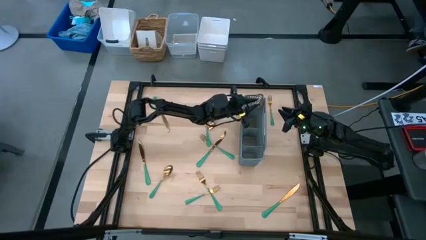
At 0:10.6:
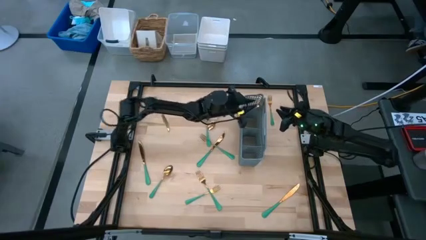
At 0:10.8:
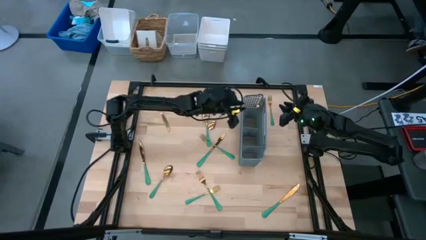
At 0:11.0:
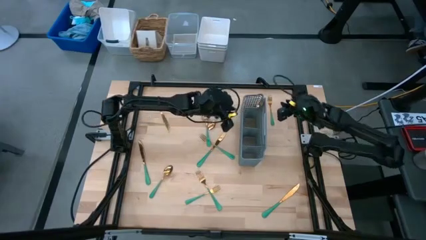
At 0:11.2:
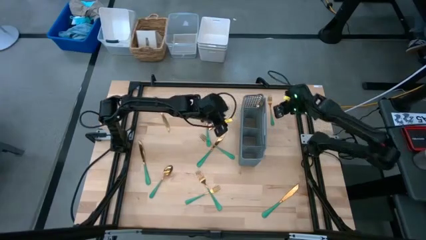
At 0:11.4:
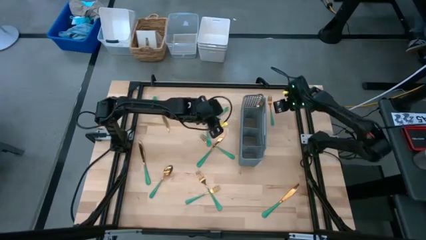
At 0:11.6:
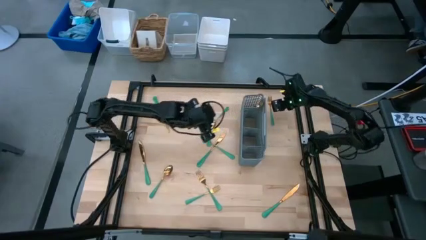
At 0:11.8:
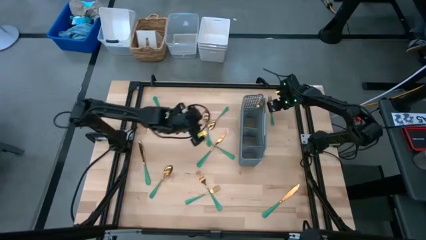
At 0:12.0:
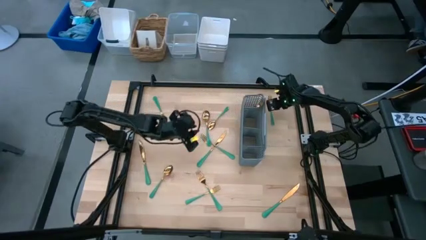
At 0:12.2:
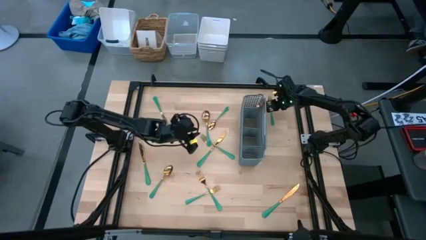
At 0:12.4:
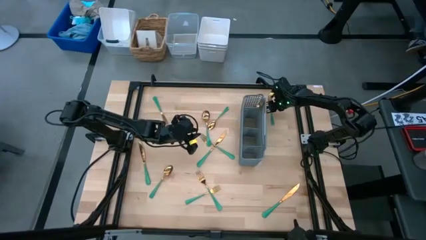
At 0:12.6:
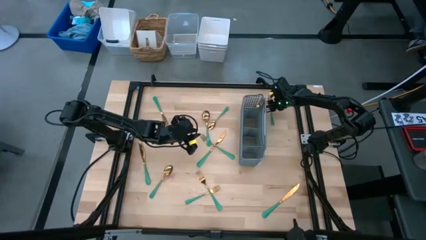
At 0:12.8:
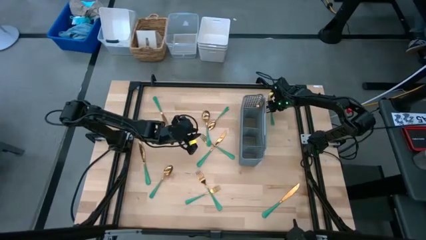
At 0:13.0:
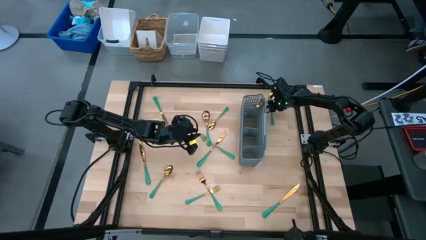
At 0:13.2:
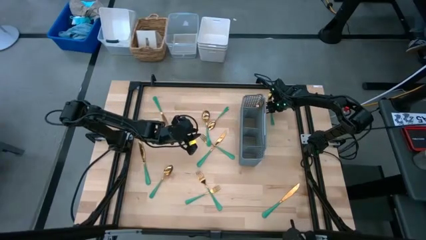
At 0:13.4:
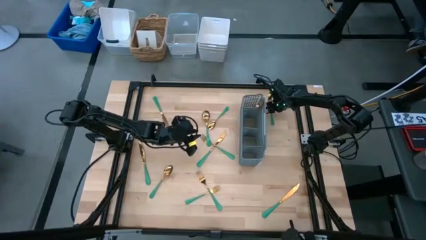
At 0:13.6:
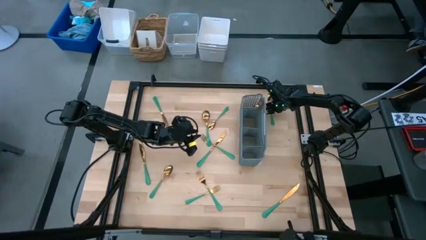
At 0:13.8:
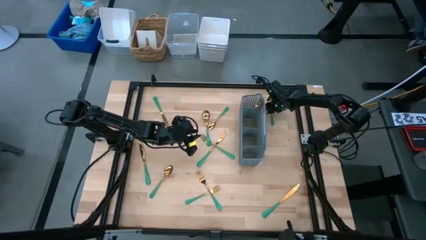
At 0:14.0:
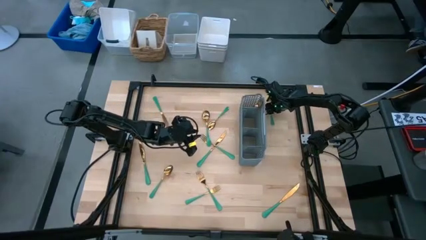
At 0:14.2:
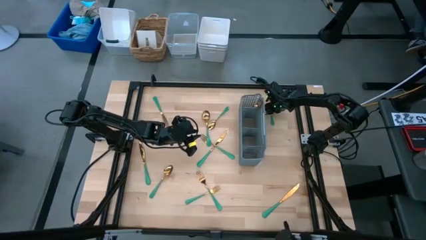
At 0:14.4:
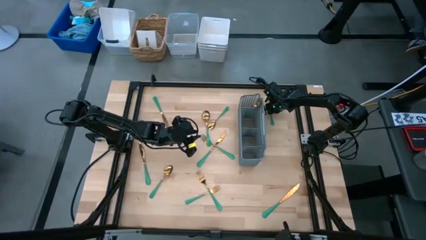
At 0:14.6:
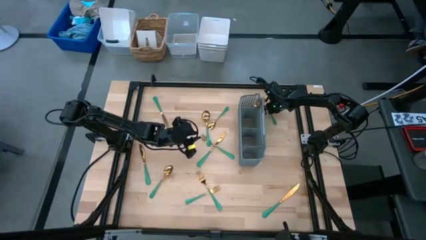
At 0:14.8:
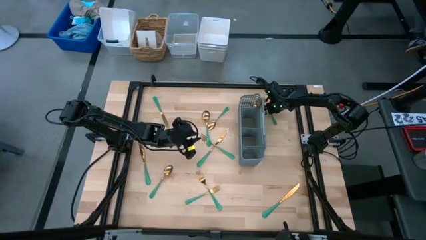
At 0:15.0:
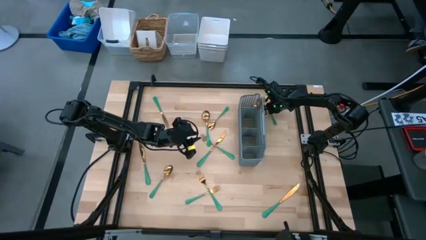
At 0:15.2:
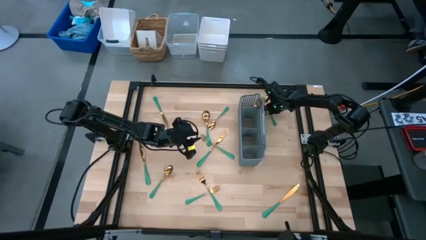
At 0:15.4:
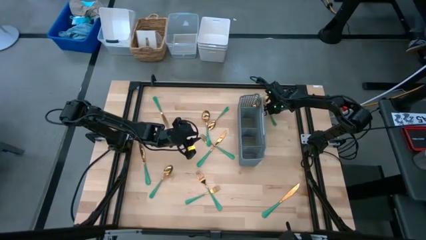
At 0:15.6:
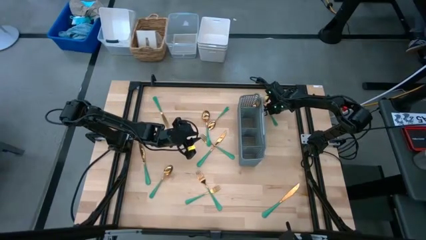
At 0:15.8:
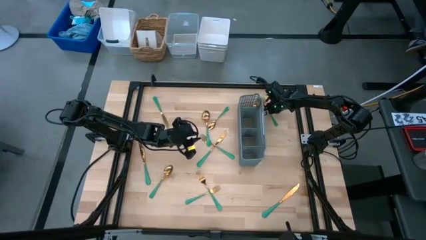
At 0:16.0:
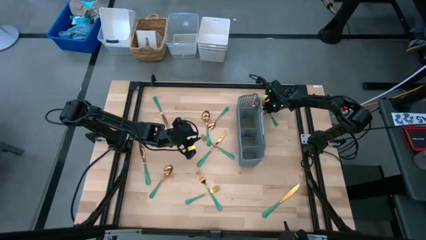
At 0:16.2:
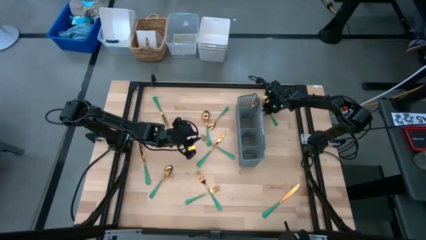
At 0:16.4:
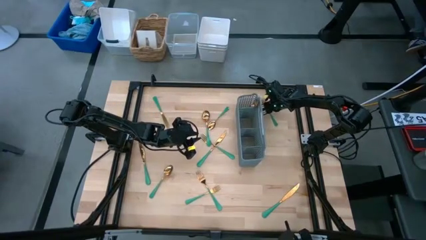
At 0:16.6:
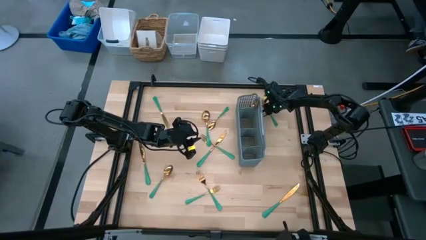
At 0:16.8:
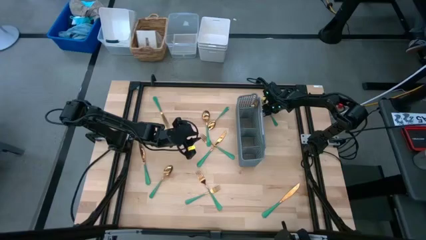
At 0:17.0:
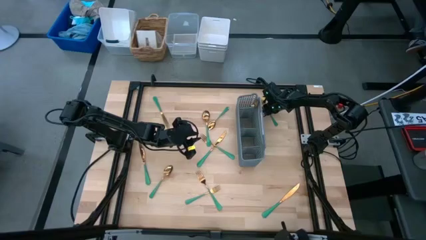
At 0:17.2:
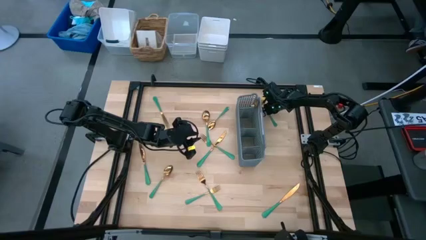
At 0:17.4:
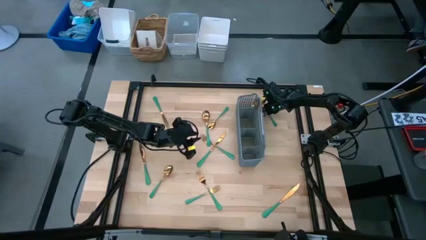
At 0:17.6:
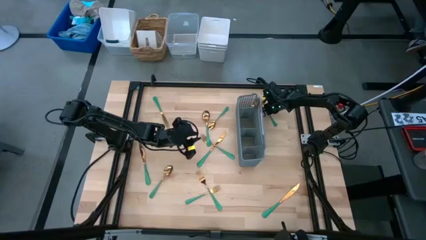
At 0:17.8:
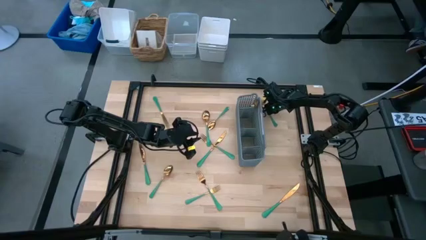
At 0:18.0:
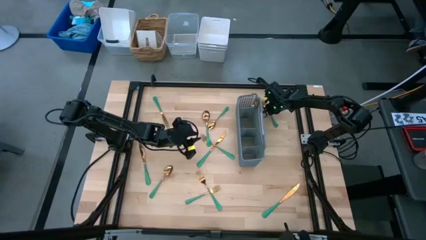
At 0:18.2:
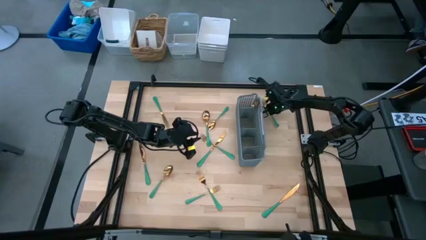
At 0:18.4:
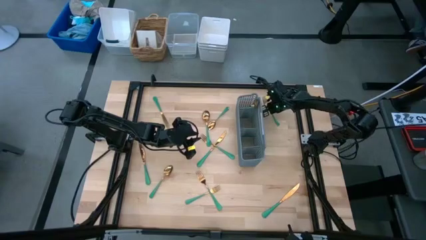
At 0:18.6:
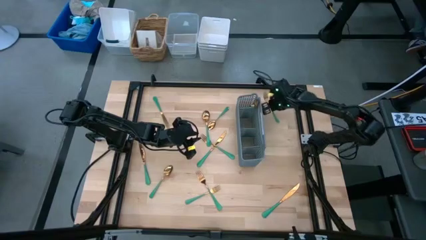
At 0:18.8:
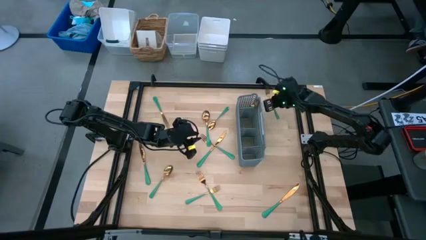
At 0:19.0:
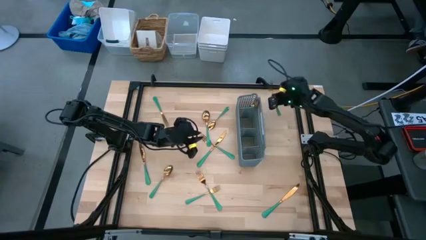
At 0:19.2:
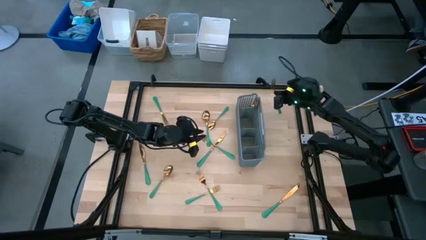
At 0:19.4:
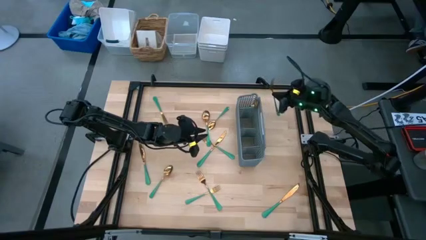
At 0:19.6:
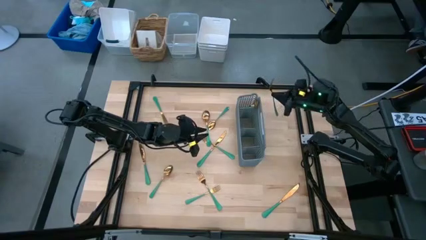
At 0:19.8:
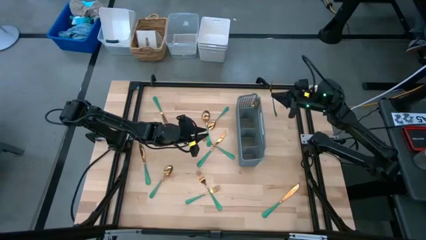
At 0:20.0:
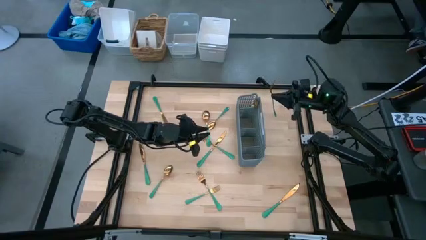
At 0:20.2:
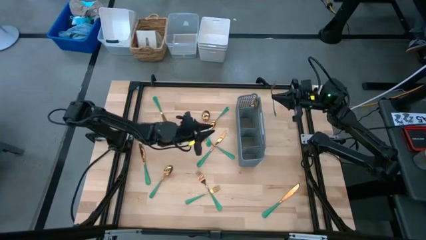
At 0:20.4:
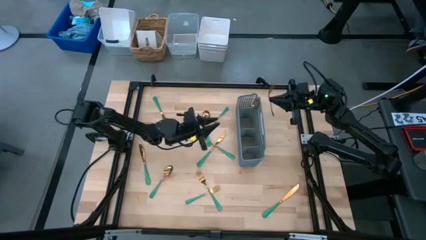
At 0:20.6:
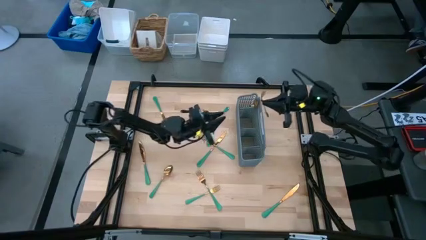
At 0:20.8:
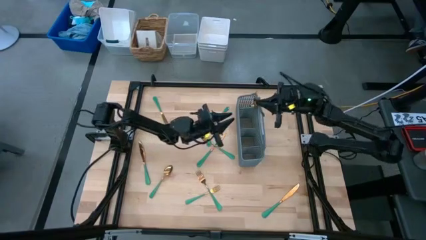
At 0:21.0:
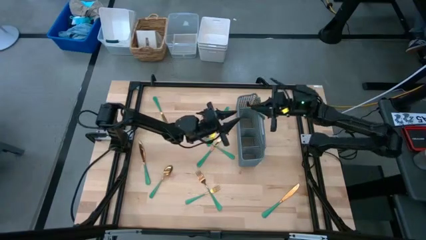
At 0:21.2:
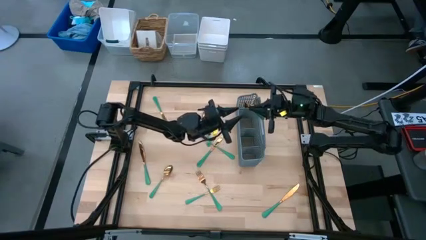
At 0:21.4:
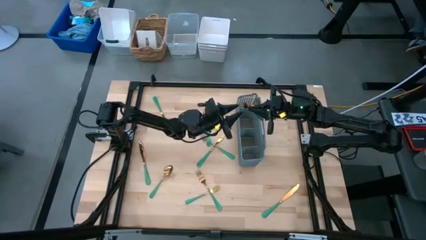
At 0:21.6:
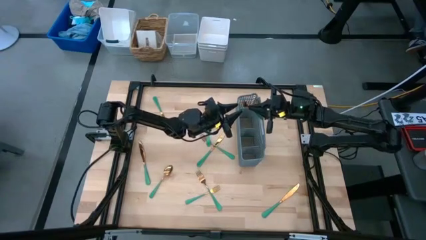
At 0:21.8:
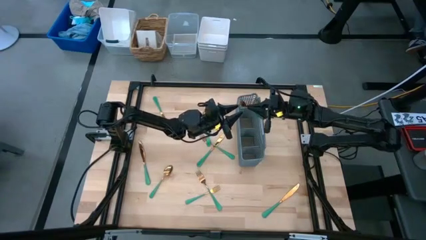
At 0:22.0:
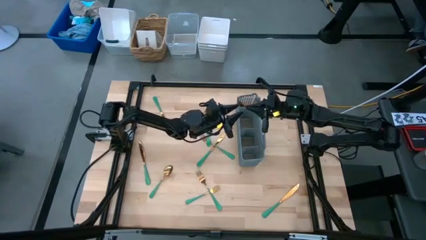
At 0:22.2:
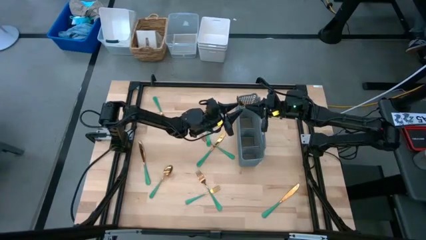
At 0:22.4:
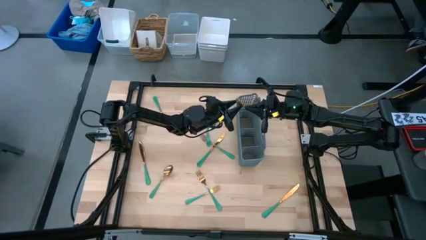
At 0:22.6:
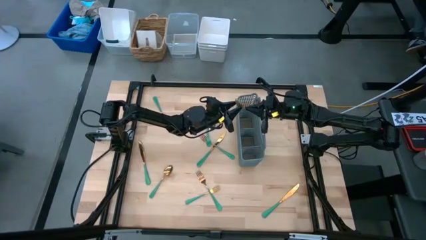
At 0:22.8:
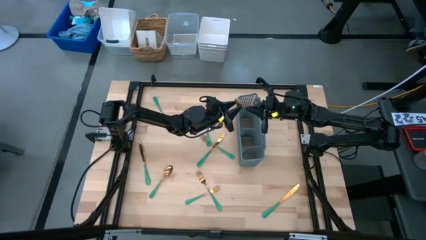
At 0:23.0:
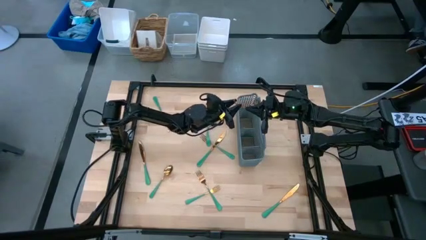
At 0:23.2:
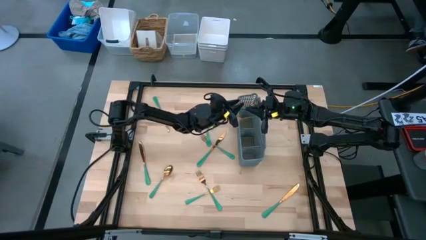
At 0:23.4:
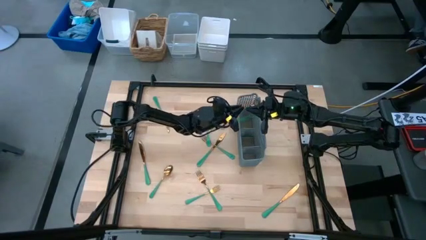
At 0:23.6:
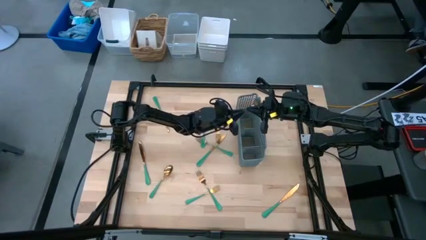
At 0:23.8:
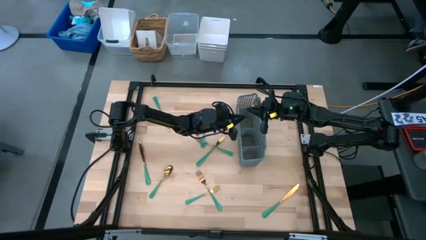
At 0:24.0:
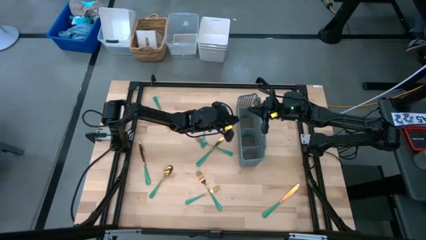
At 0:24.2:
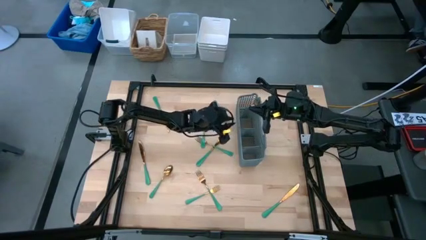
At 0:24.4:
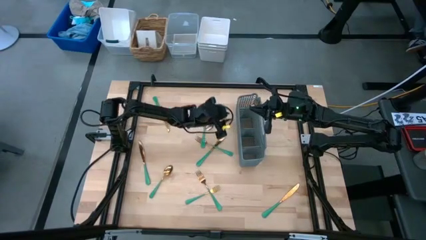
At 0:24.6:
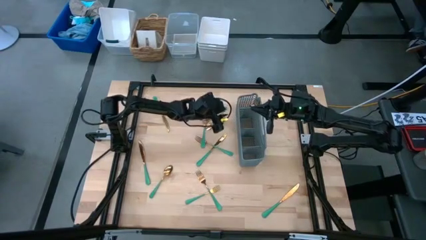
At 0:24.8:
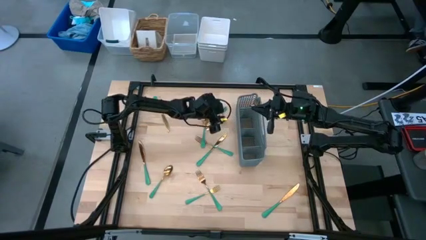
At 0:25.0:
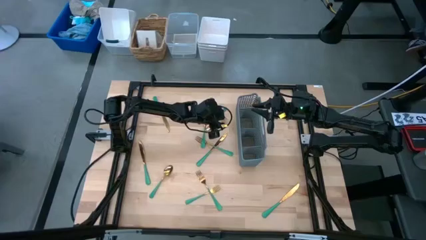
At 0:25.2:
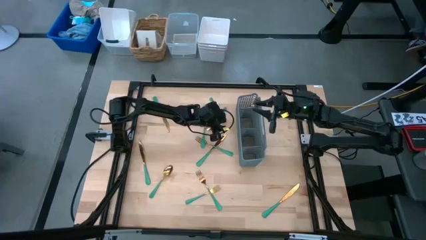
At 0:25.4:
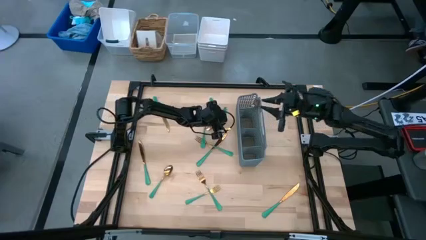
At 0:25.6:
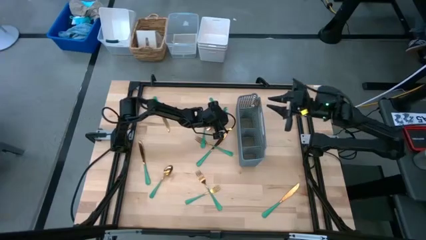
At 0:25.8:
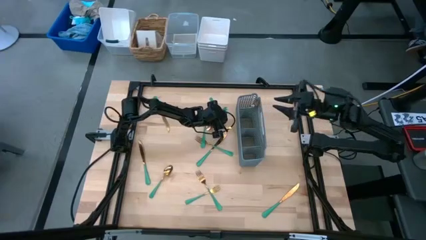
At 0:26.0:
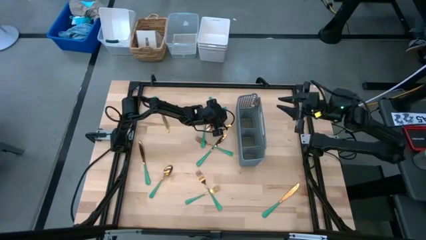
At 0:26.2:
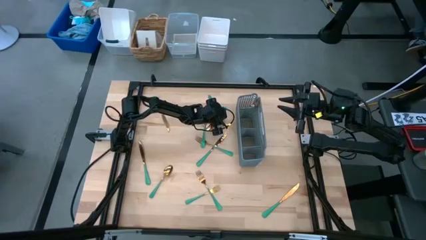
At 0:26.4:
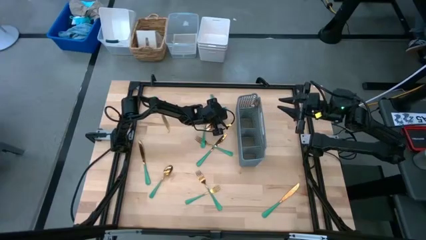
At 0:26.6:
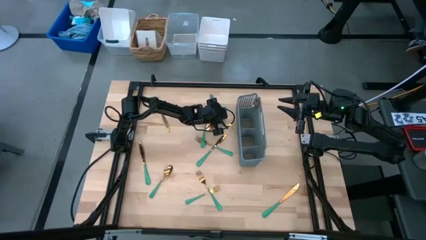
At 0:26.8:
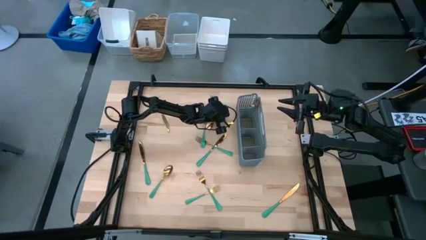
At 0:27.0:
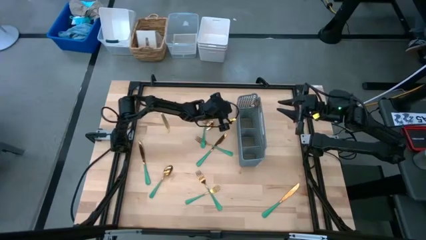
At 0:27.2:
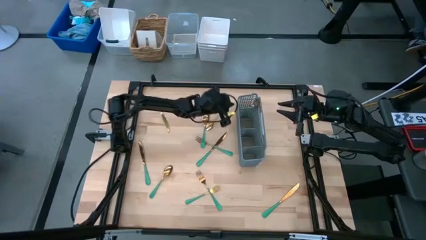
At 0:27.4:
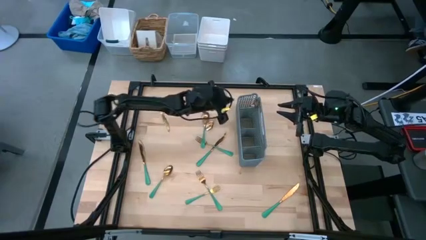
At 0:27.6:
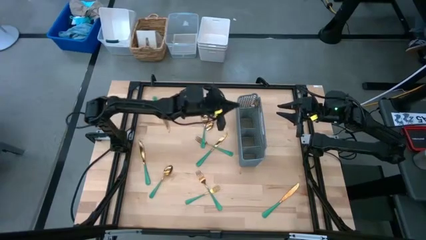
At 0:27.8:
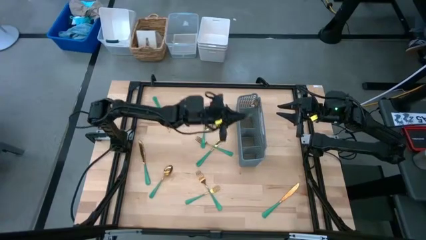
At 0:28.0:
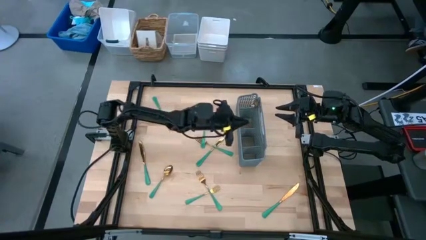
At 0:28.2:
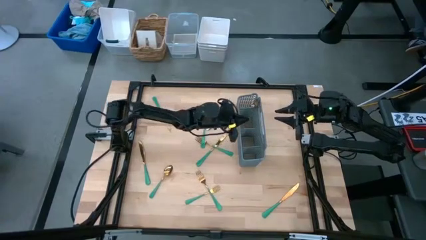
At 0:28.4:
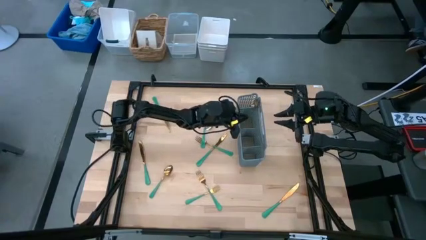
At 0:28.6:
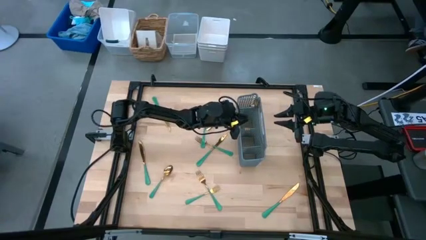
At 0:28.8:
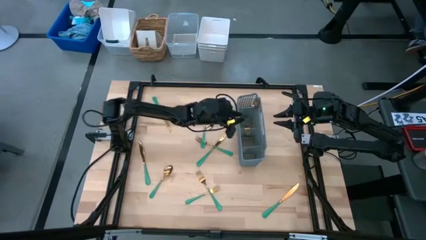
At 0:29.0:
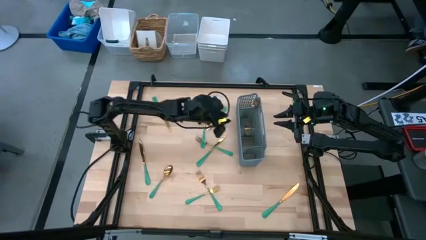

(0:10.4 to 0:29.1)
Task: Sort silverware
Put the top right fork in the middle section of the basket
